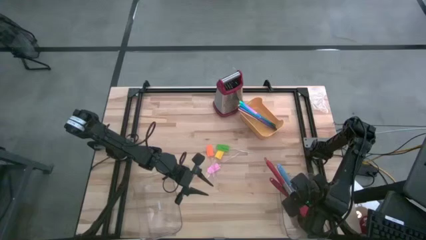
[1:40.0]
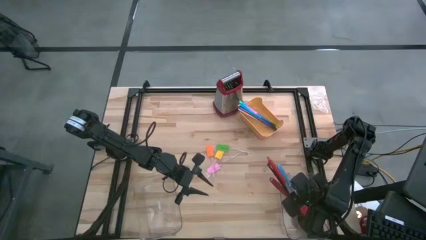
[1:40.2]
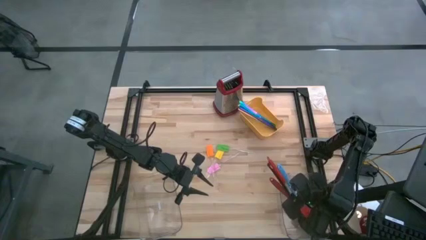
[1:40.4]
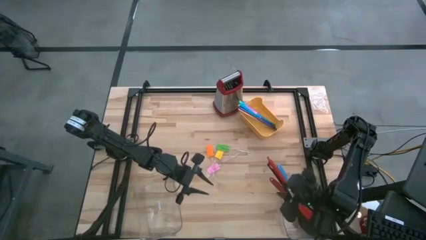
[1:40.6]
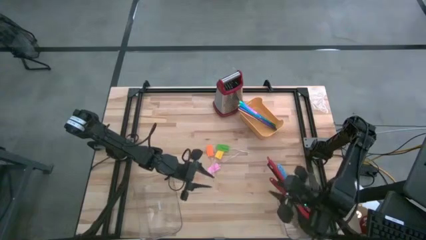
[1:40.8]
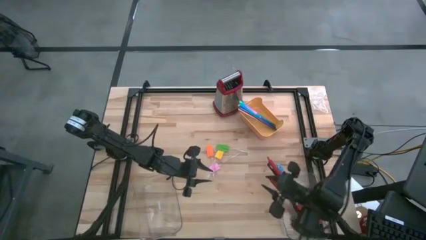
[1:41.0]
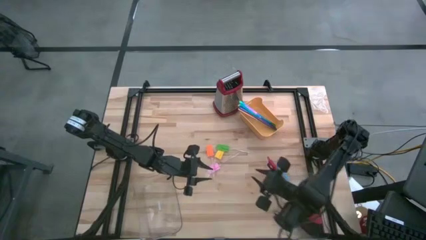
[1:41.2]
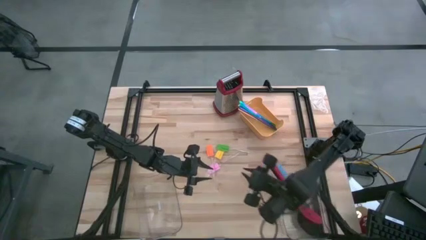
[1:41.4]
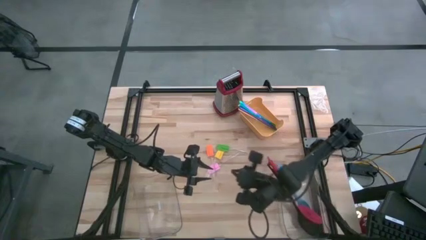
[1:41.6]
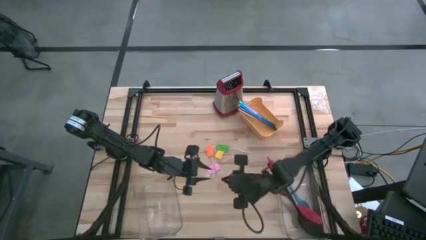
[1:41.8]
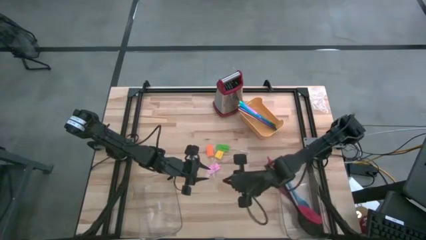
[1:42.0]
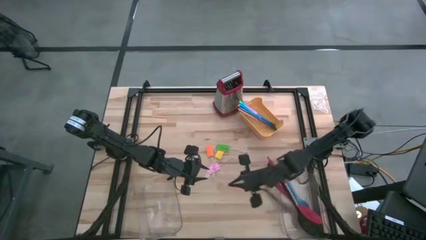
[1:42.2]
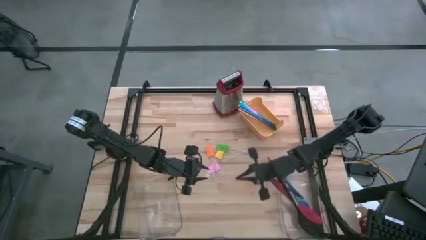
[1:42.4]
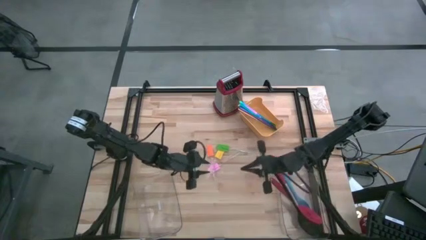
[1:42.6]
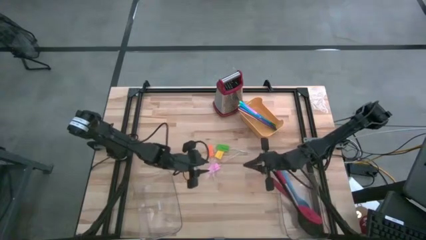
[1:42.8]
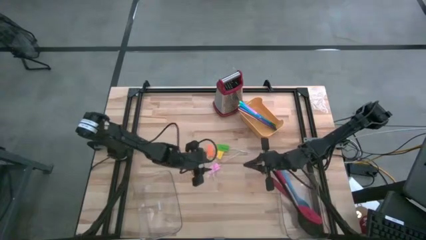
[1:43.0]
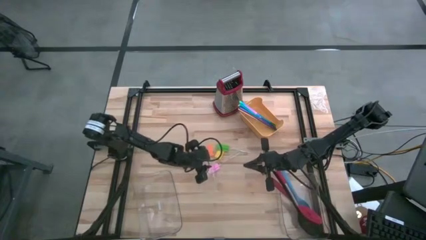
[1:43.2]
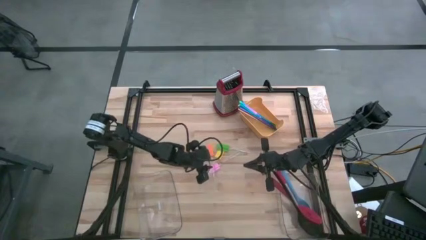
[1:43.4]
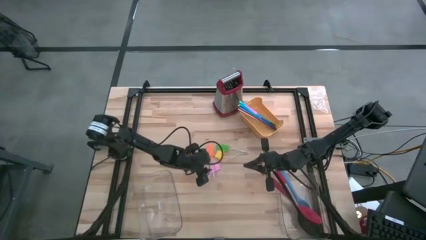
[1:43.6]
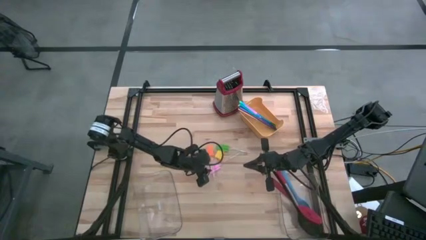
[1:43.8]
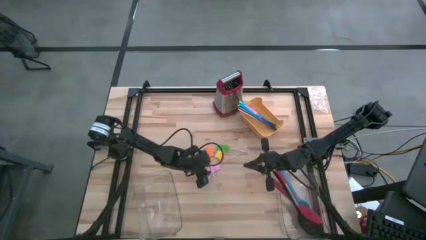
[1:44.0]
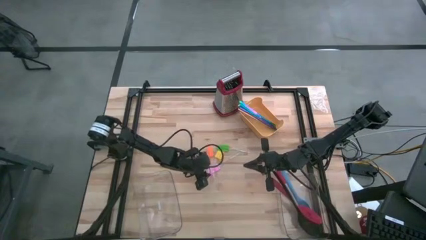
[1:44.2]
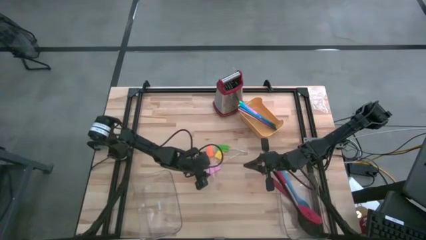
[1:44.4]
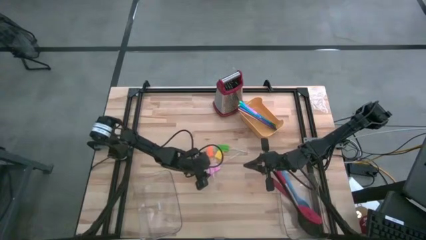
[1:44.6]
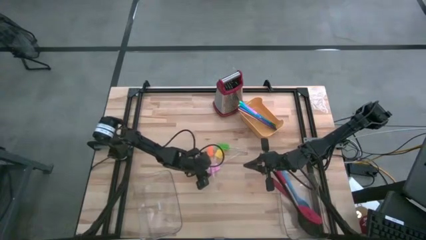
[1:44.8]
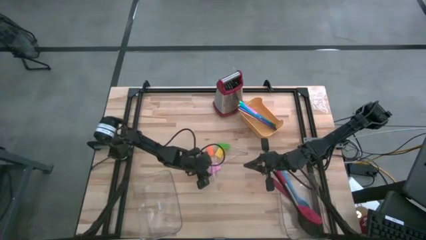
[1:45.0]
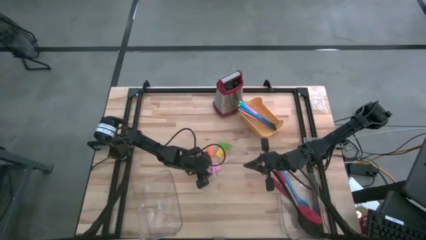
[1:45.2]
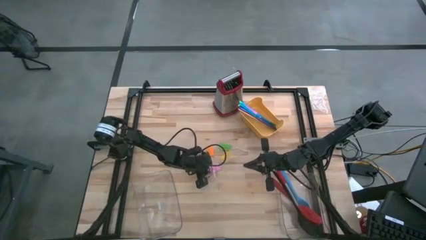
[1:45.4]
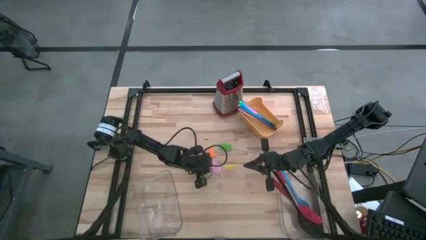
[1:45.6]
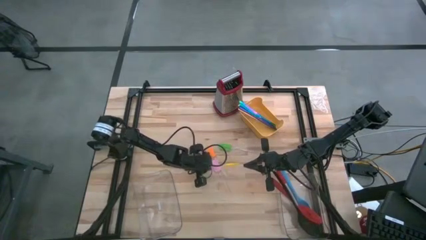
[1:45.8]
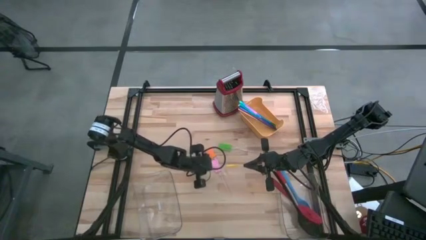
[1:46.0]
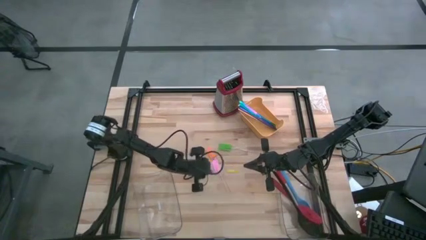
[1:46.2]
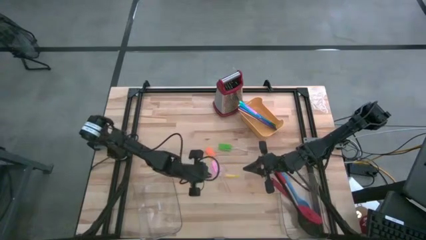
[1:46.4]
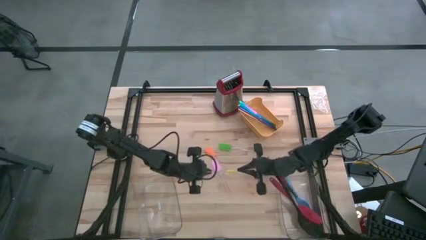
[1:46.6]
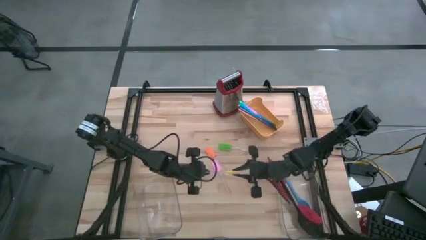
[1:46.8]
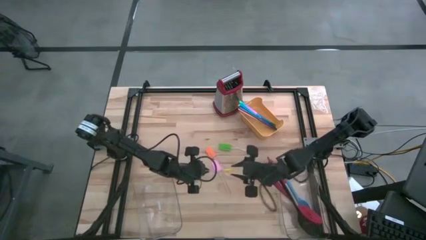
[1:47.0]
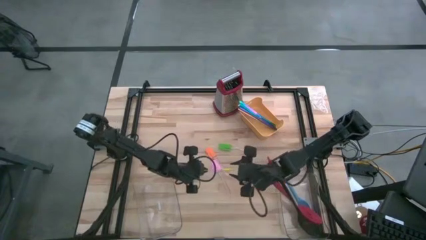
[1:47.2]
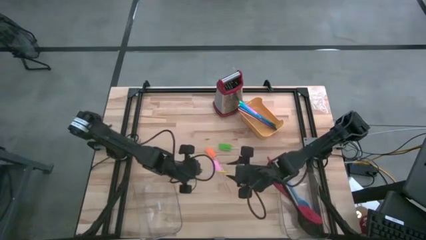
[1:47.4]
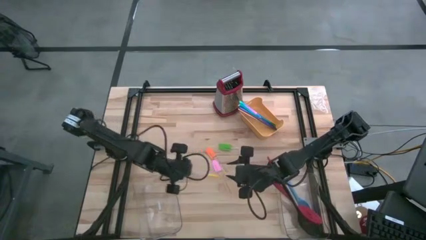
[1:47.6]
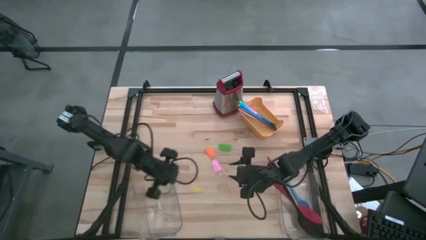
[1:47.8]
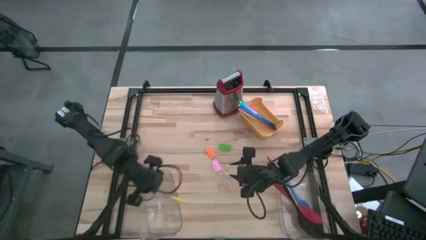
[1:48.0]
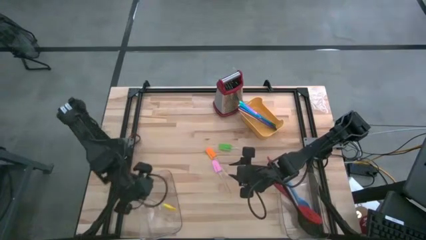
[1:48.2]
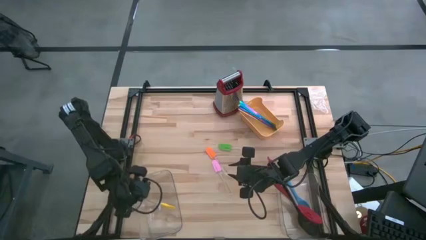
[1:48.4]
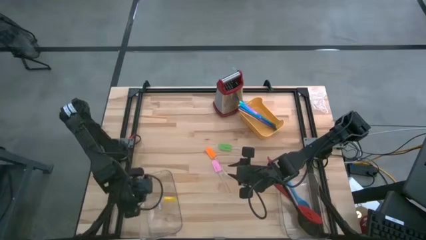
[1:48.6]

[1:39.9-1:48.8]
Task: Pick & Place Kitchen Items
Put the yellow spatula into the left transparent bin

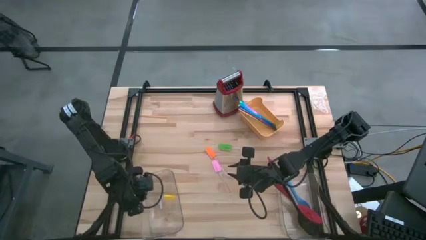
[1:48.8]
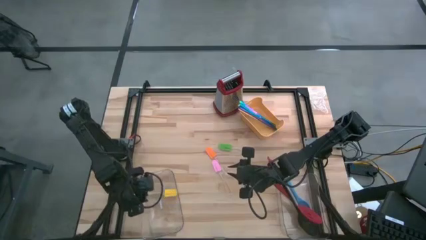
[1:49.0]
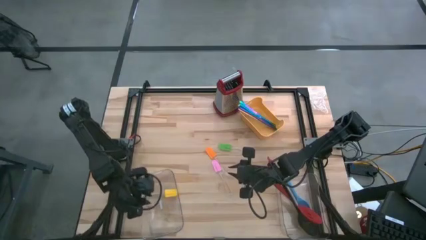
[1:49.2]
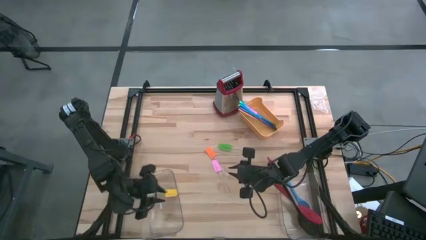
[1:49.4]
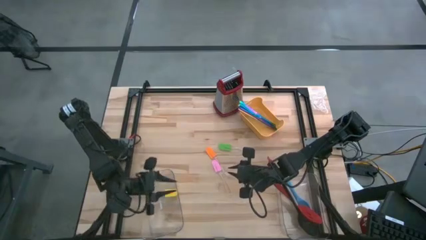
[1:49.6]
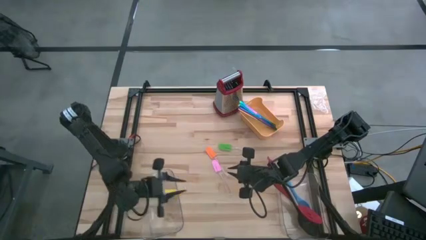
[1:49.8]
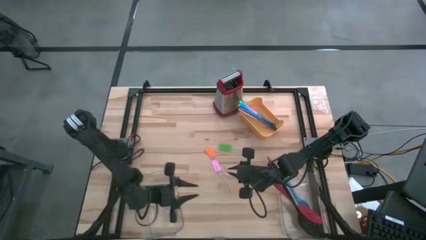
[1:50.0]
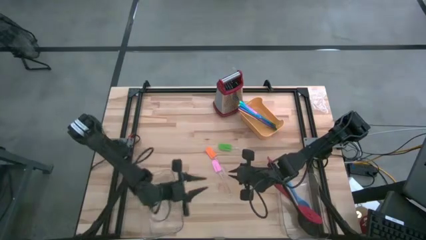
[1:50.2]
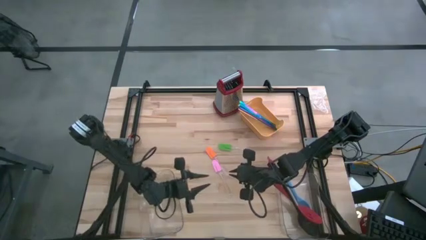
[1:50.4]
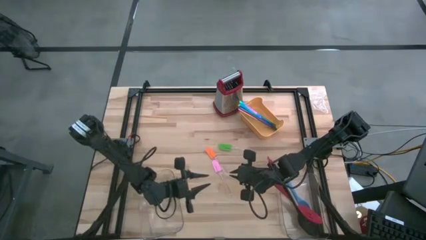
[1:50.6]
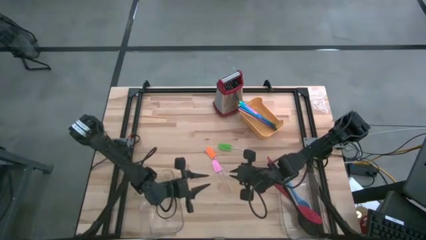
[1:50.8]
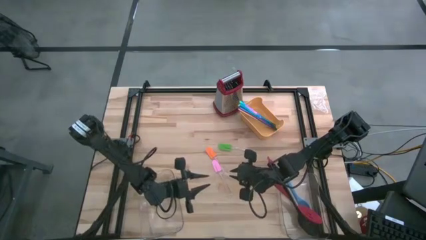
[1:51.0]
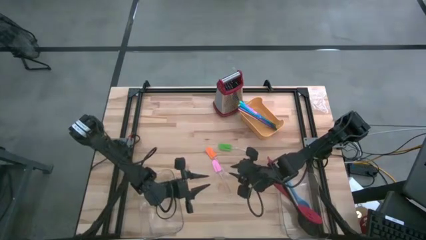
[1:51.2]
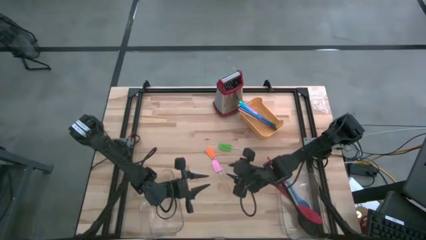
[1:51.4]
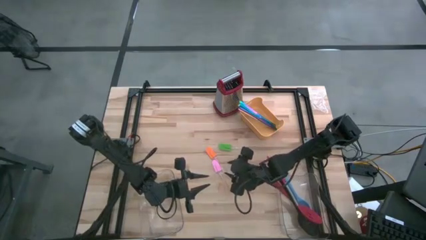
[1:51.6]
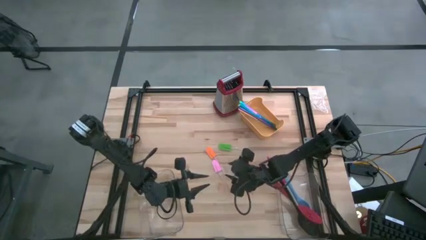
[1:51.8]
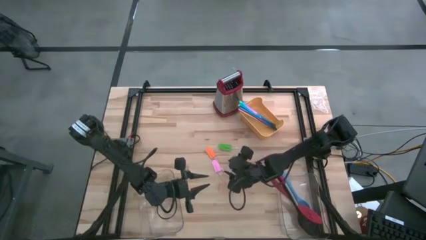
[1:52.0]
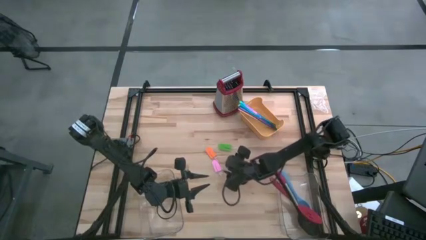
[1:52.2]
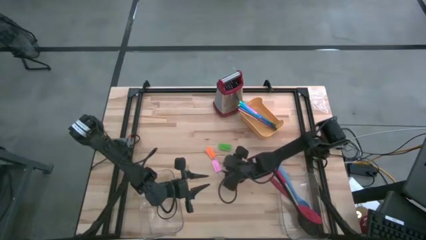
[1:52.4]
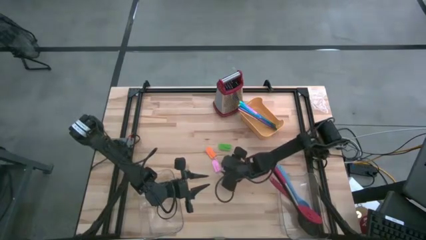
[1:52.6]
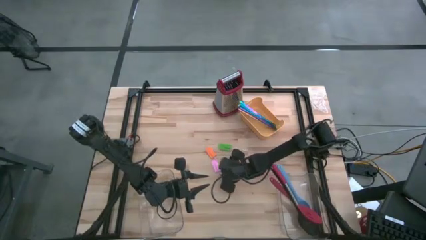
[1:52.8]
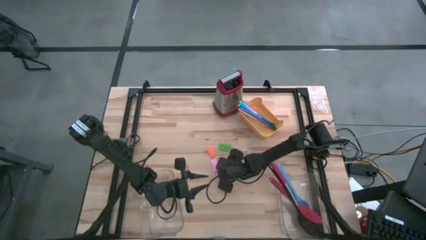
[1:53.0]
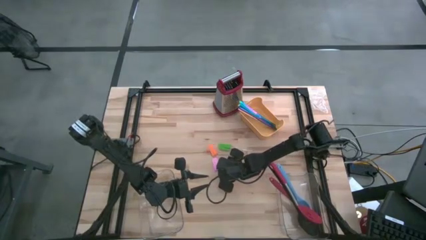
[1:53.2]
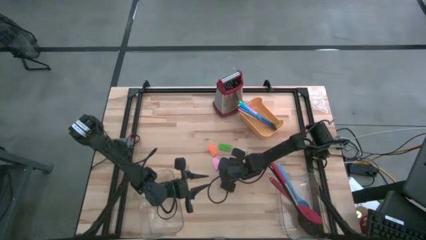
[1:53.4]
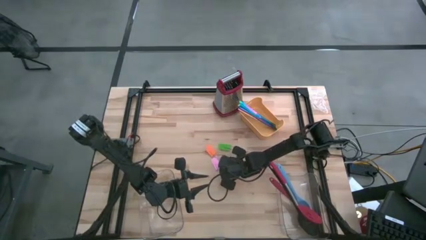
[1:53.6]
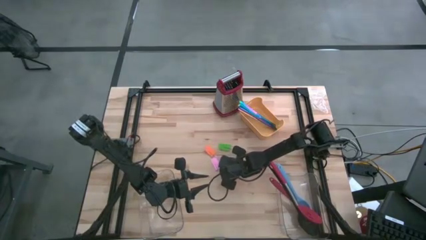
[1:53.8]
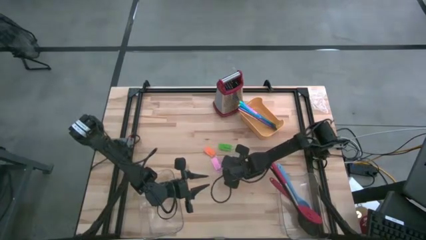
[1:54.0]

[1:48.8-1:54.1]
Put the orange spatula into the left transparent bin

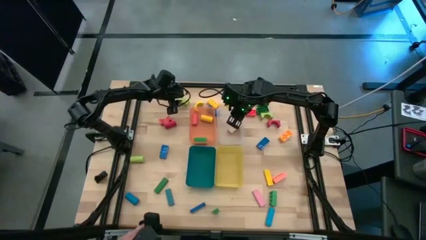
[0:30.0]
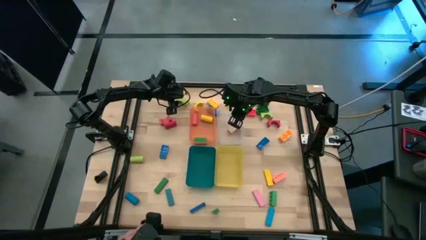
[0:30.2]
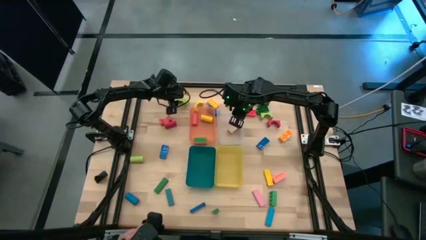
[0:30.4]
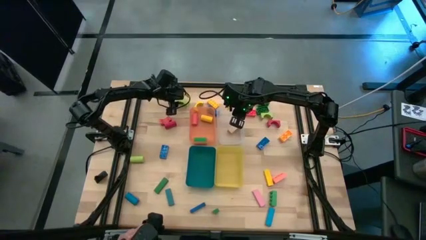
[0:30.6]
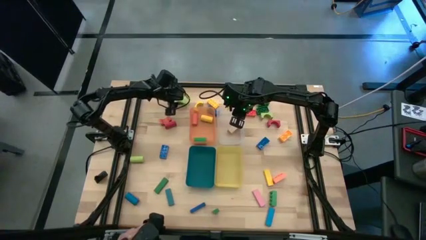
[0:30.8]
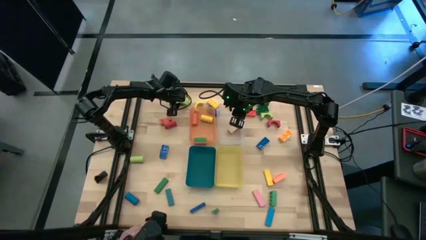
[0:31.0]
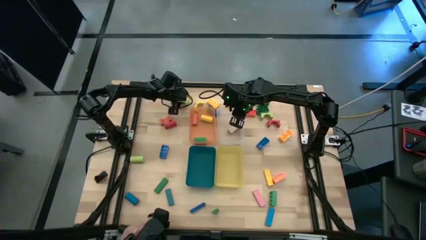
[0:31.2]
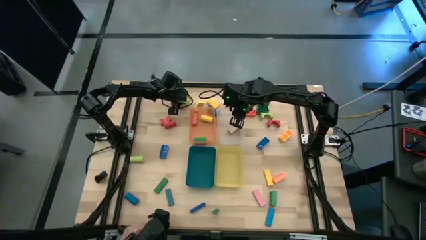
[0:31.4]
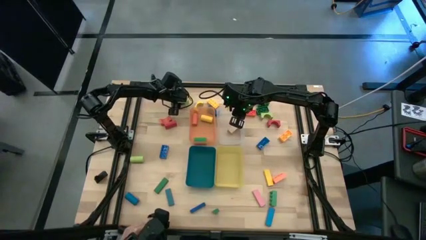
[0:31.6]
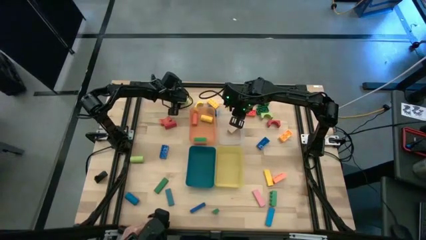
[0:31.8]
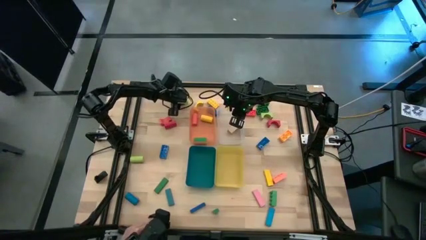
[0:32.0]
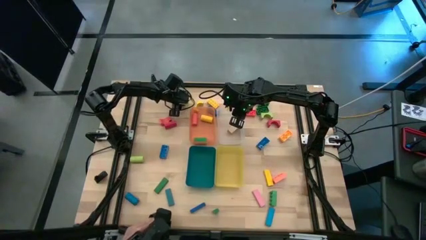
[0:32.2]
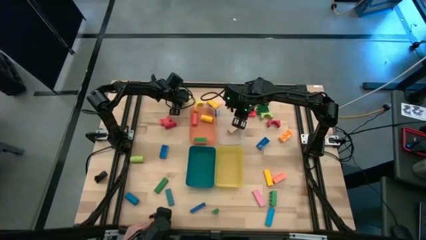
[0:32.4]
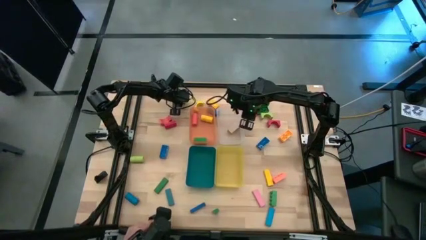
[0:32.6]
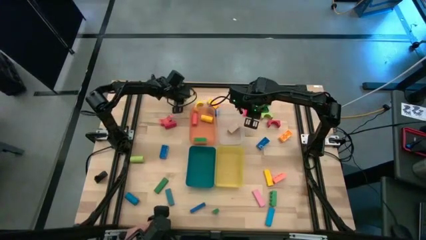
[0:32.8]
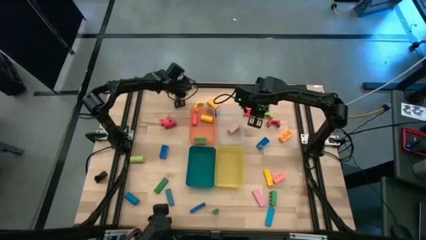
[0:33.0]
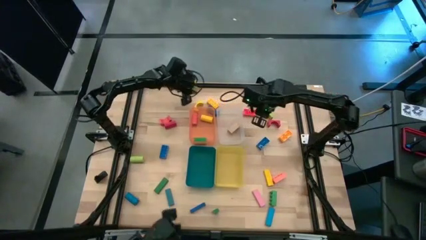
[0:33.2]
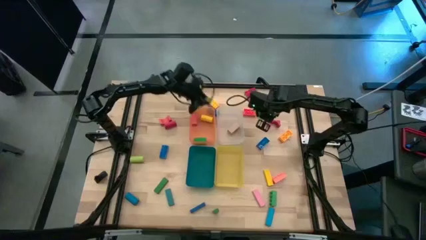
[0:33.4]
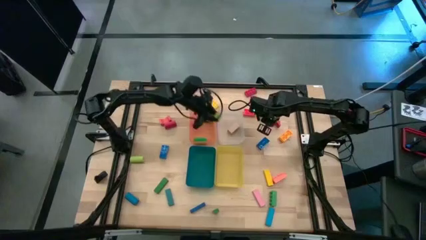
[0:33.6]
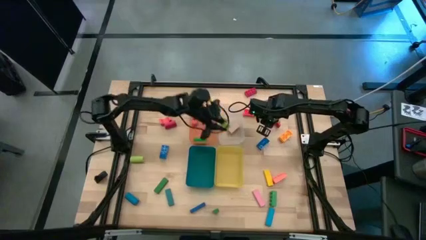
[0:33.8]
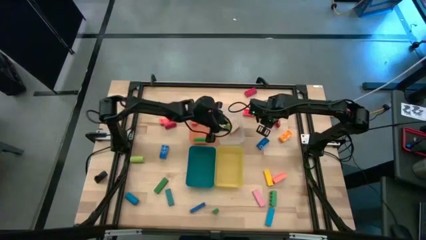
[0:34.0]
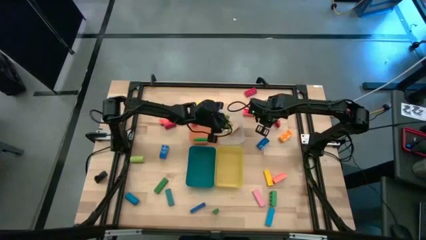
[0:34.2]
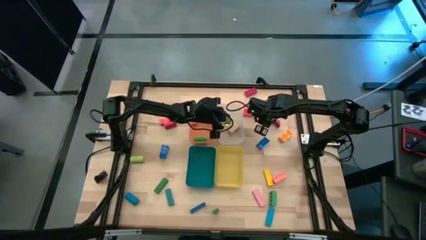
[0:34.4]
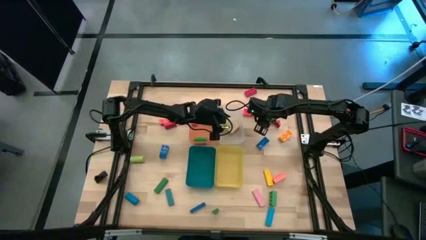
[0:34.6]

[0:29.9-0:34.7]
Task: Sort blocks by size
Put the left light green arch block into the transparent bin
